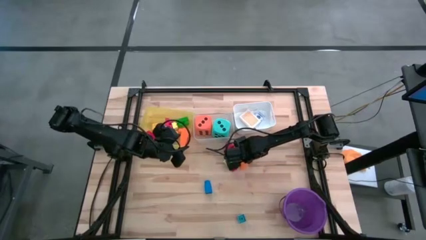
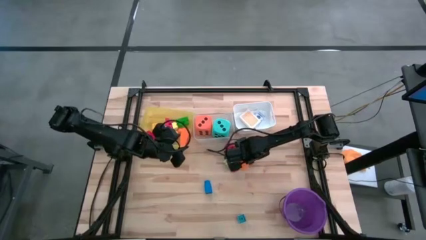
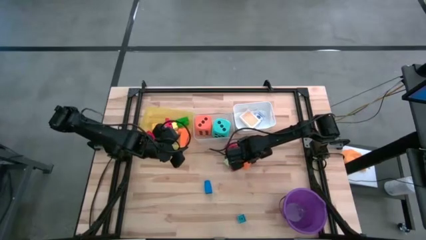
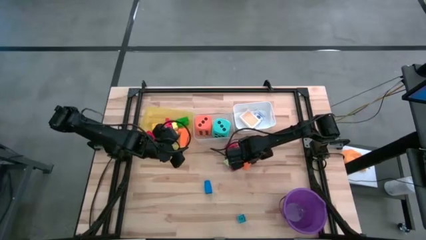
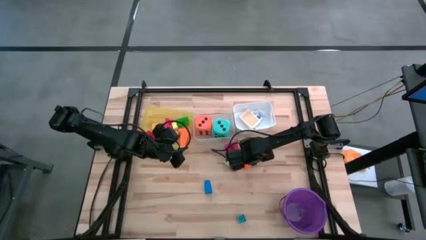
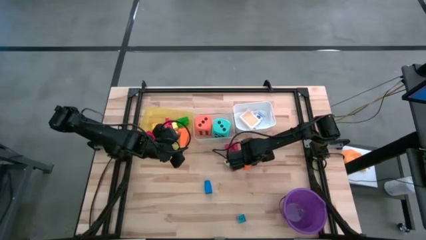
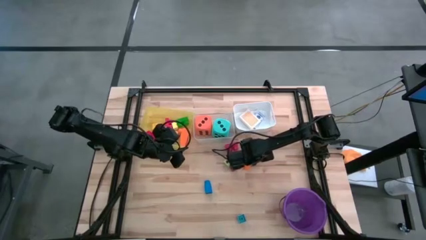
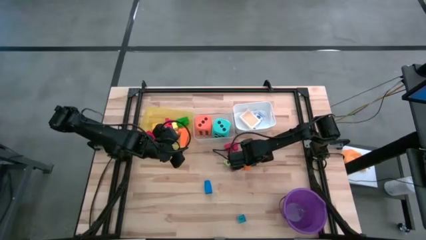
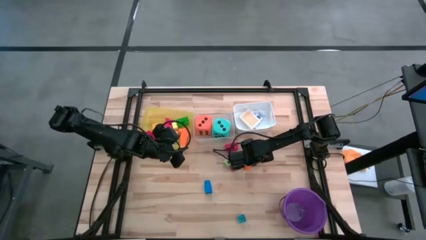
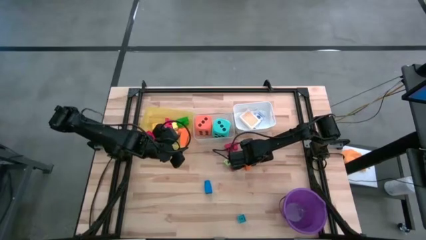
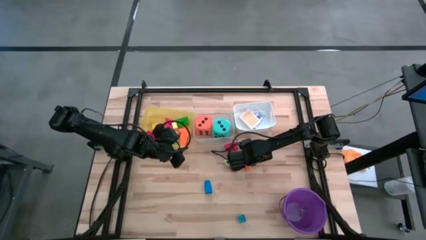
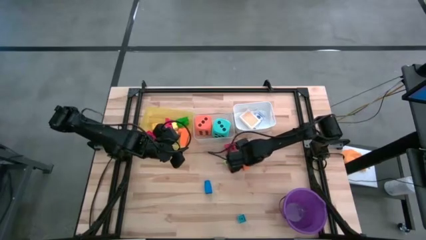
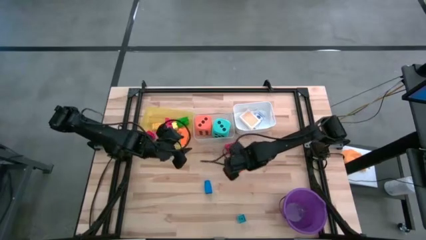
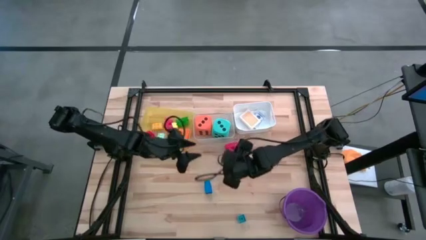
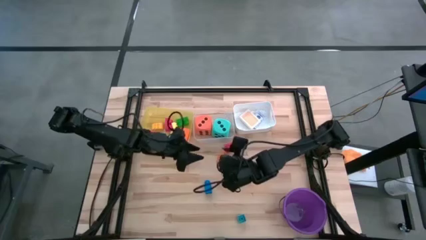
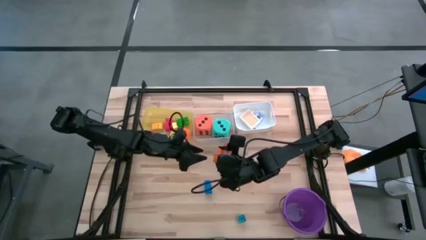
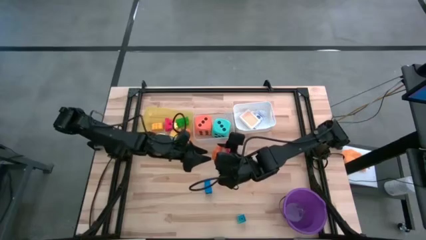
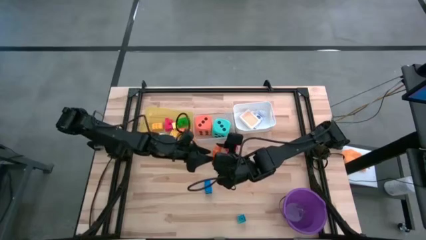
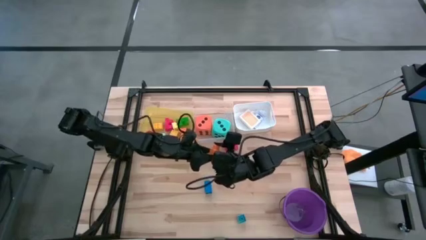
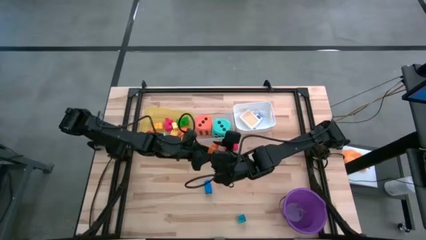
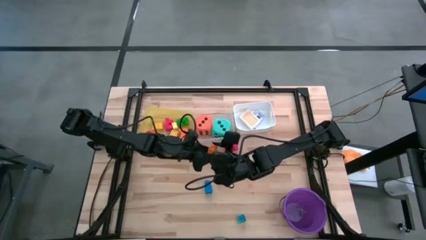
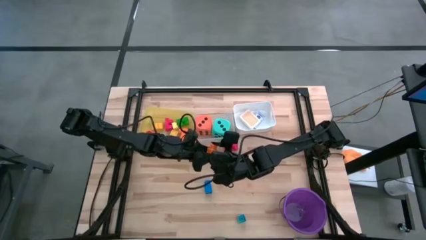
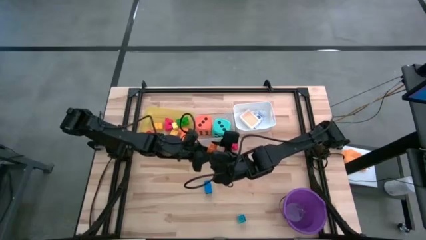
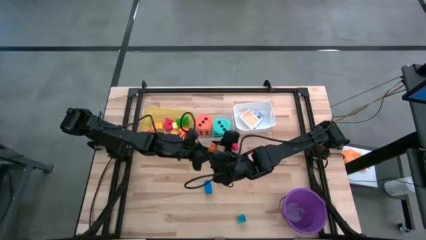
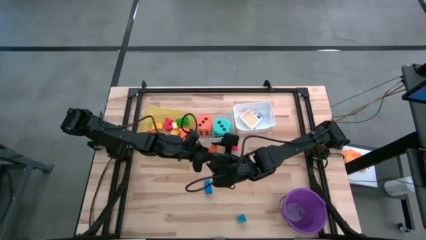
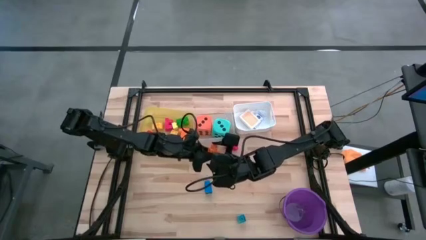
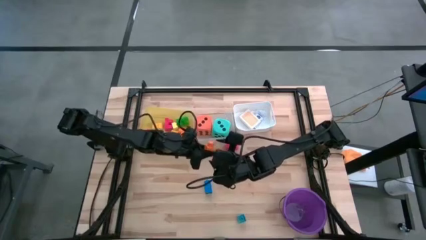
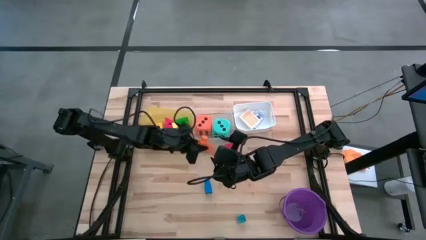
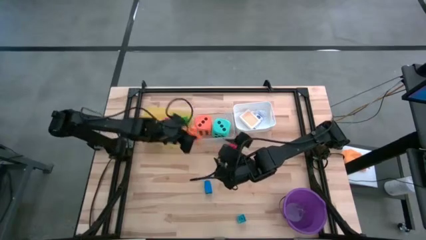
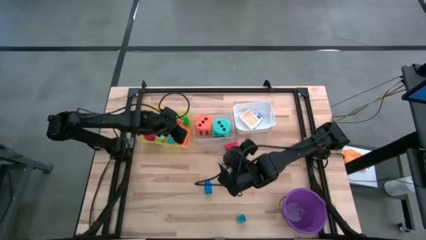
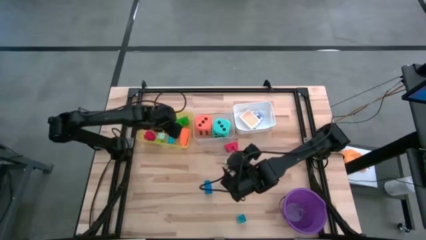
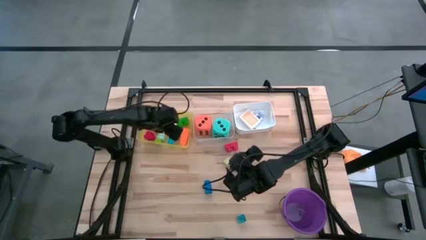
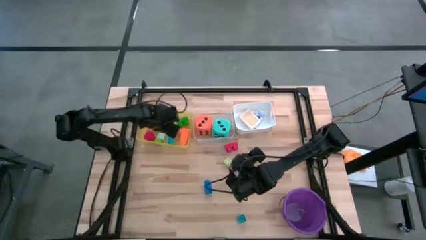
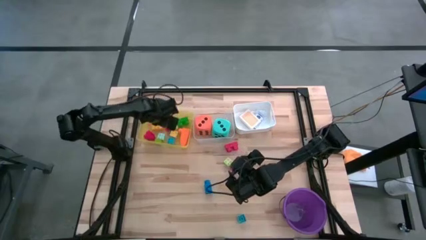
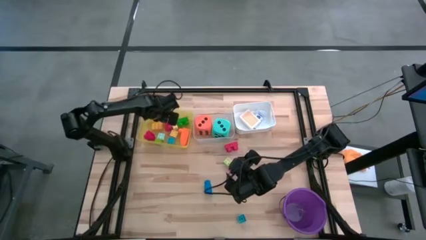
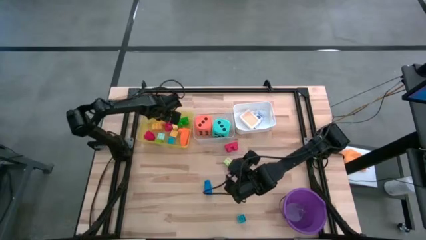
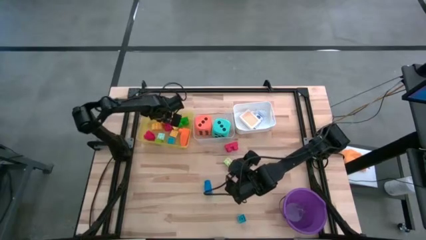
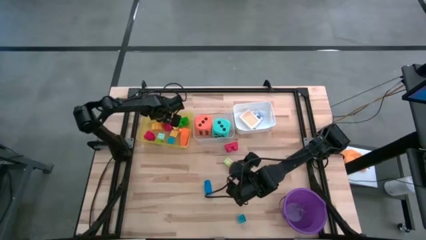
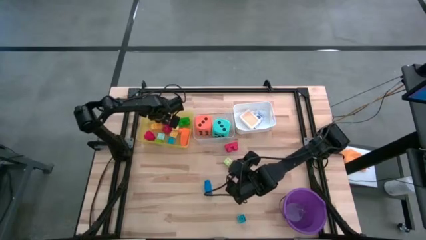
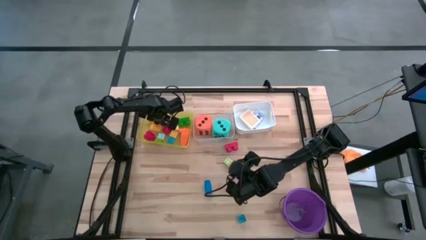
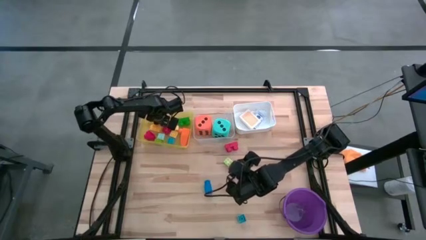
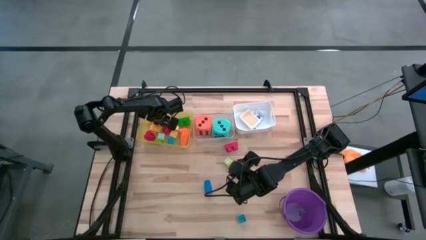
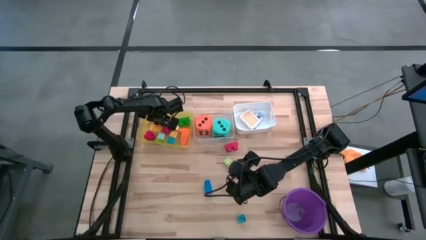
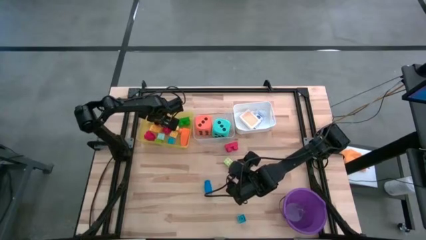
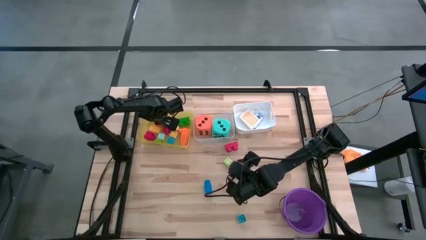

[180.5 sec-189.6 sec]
Task: Pick & Place Toys
Put the orange game piece into the yellow bin

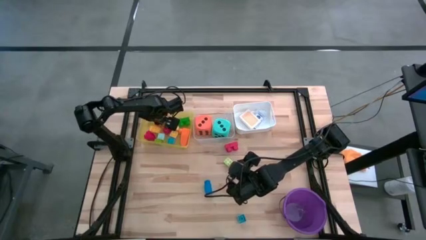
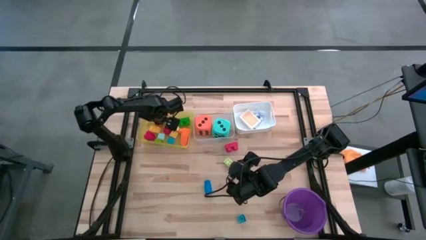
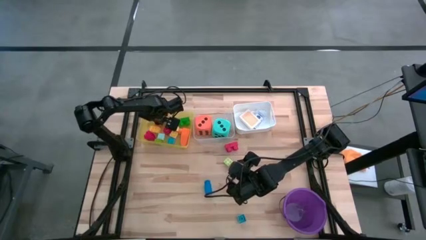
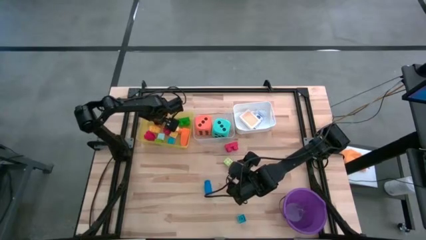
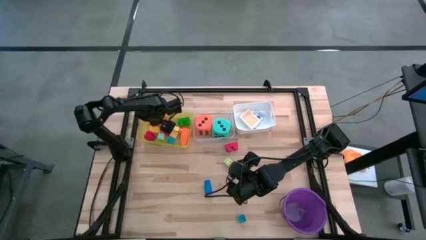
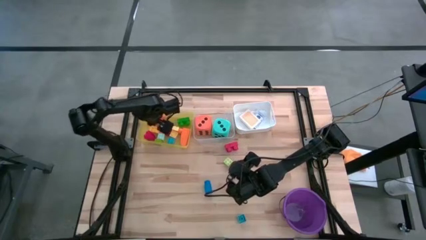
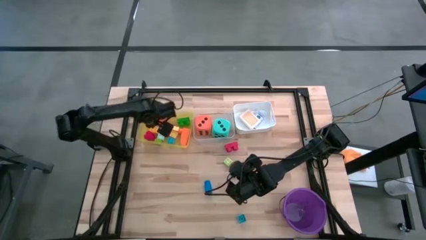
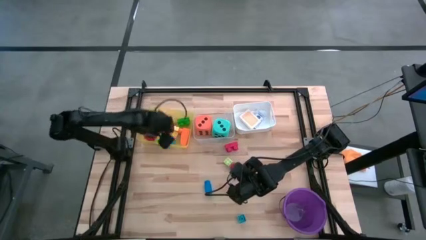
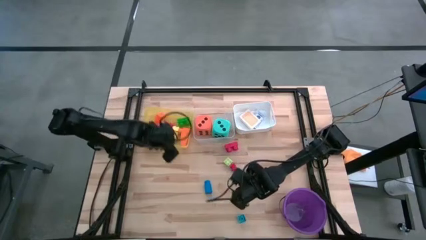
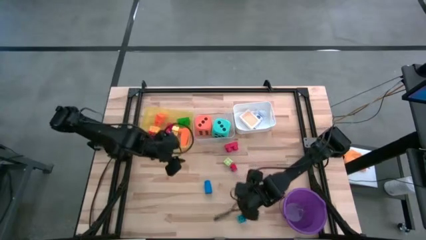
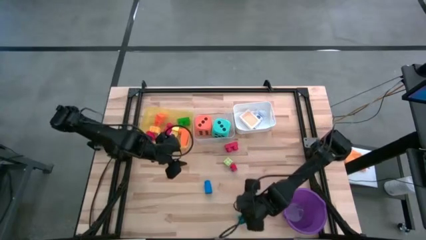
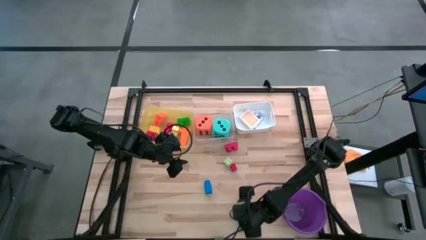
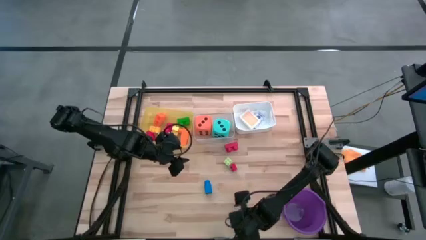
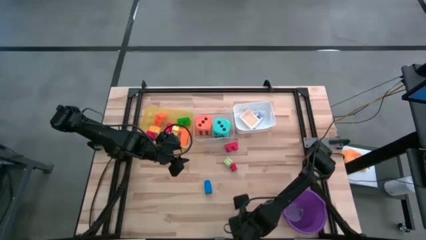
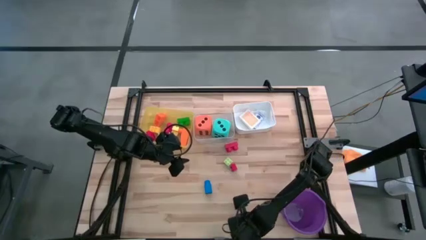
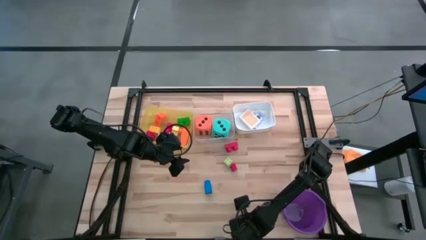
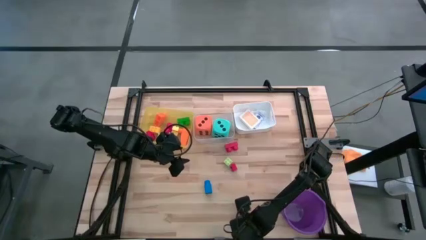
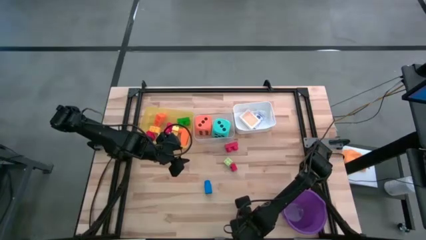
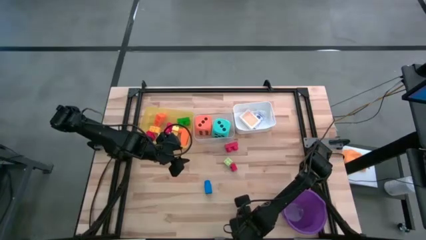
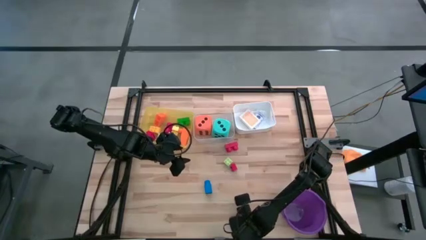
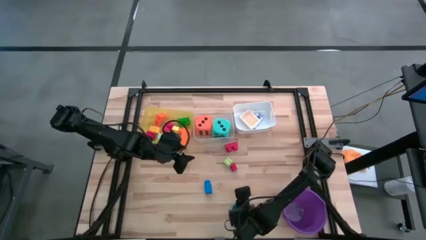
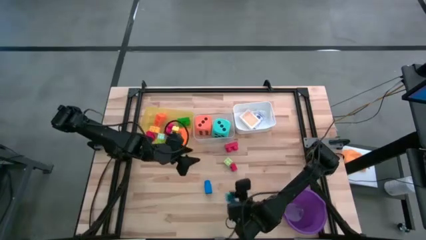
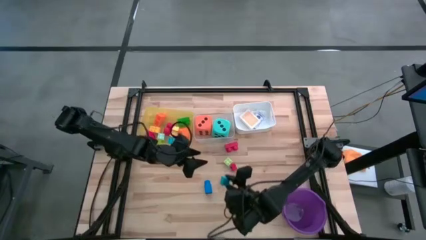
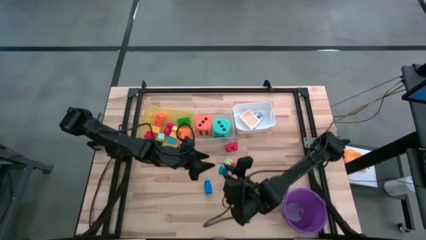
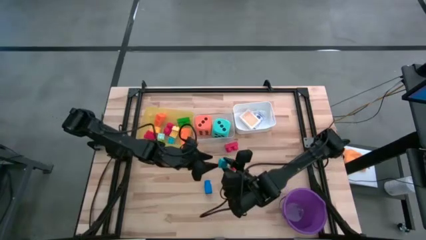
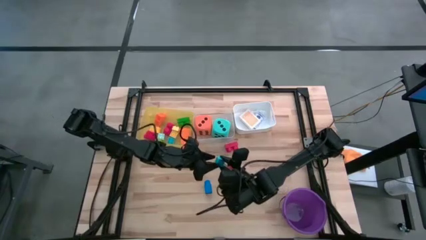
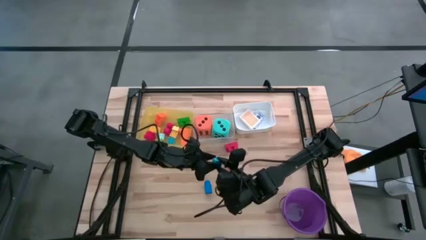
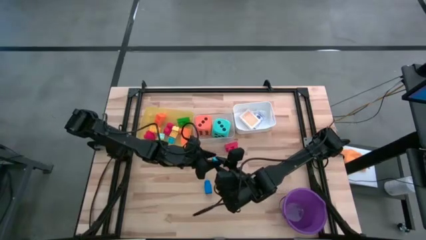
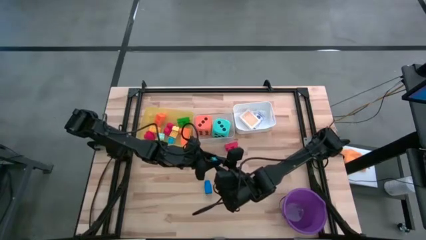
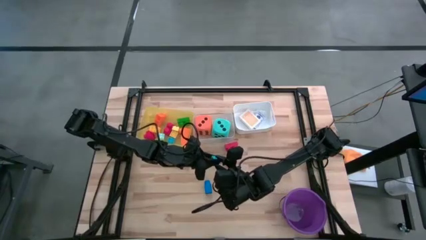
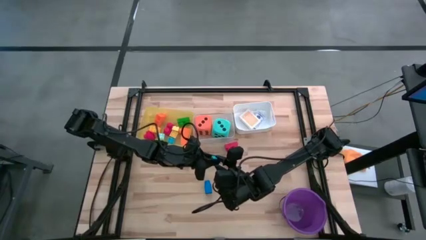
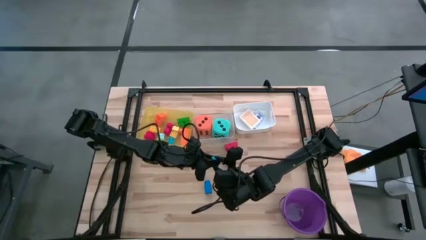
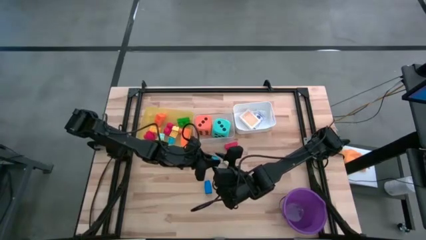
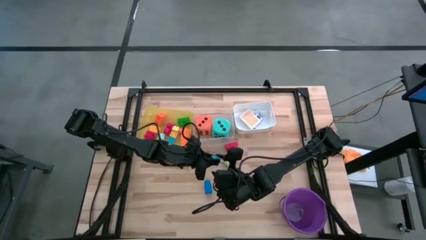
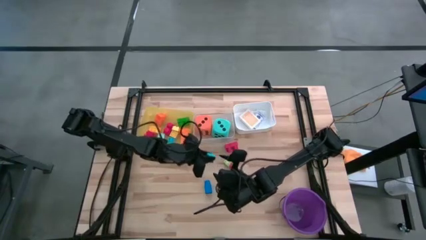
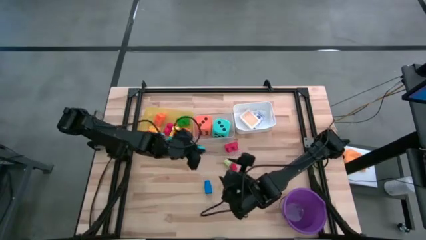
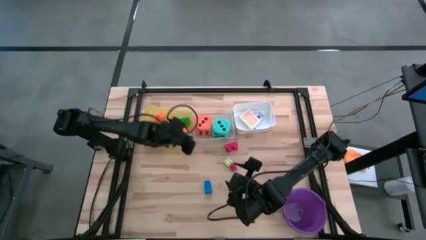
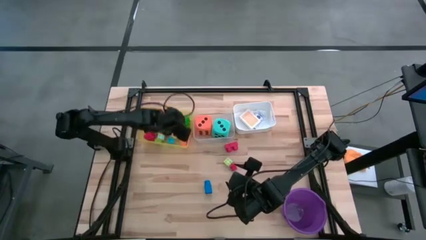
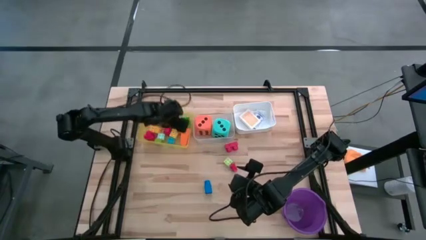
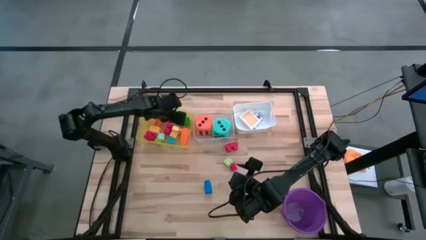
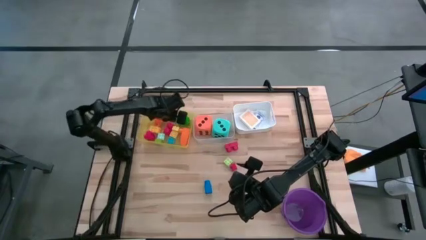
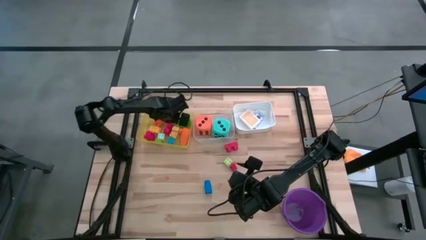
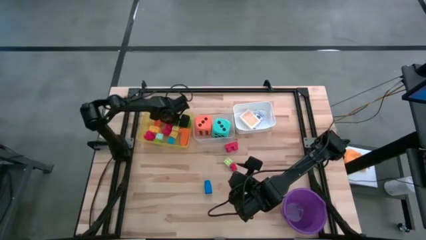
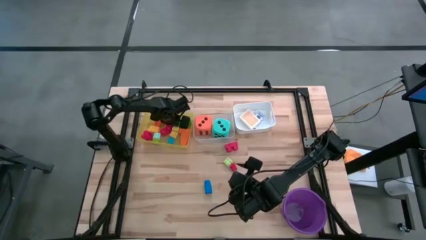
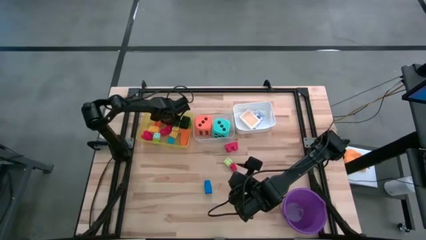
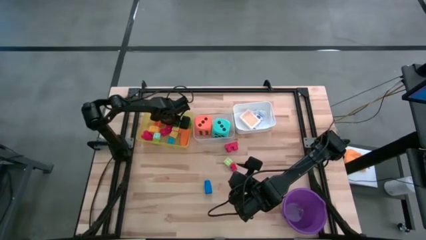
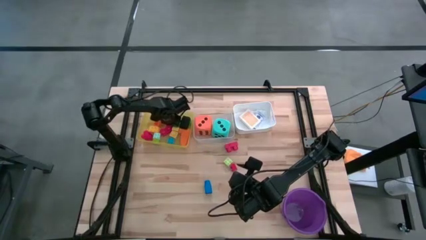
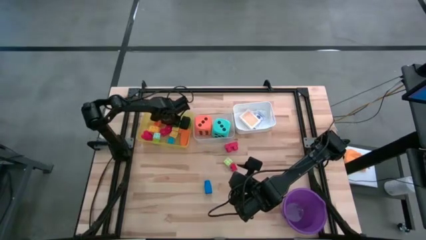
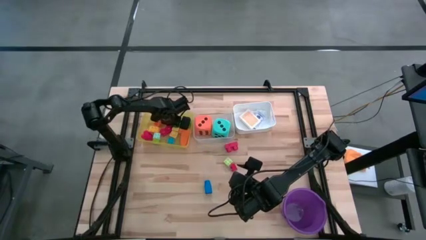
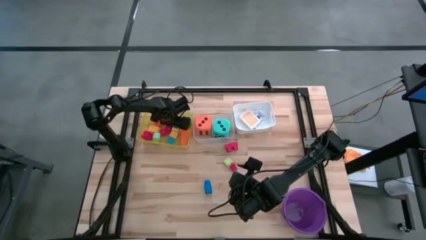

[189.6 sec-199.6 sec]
Put the light blue game piece into the yellow bin
